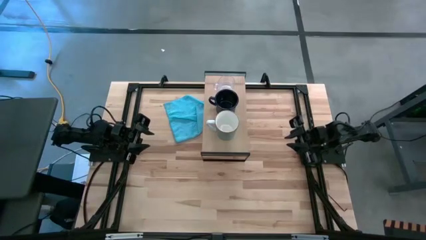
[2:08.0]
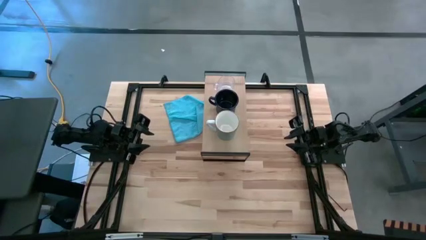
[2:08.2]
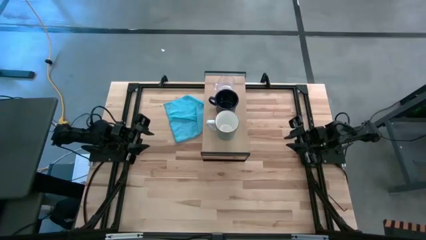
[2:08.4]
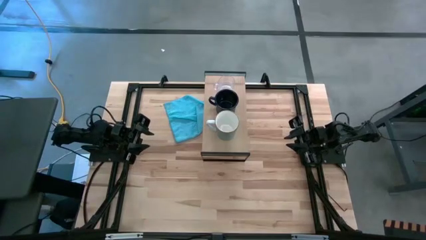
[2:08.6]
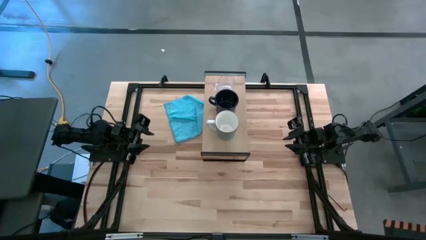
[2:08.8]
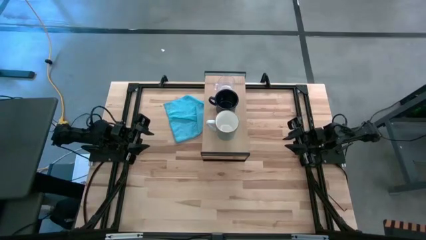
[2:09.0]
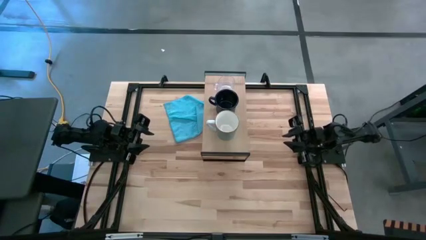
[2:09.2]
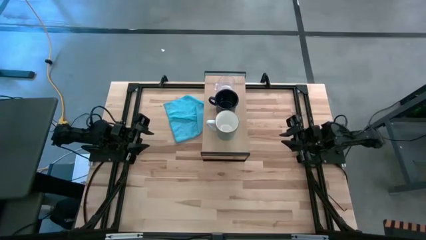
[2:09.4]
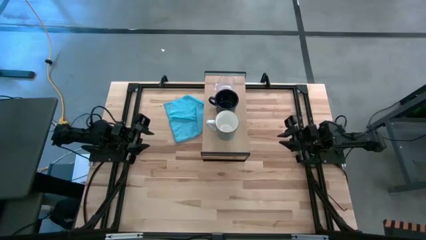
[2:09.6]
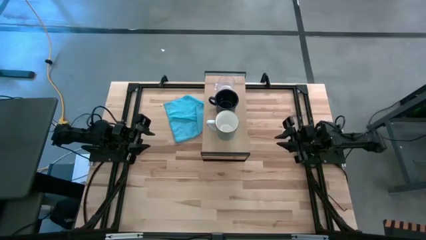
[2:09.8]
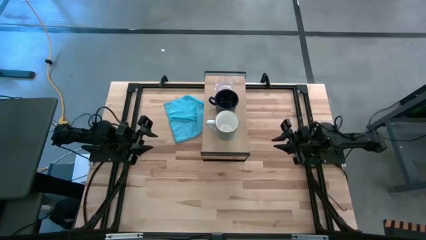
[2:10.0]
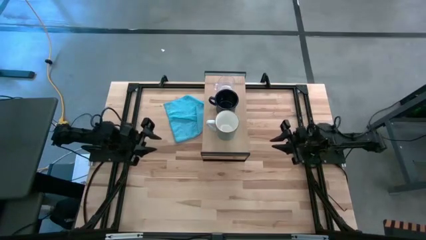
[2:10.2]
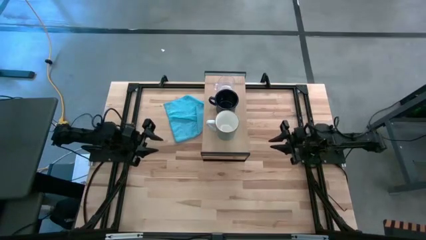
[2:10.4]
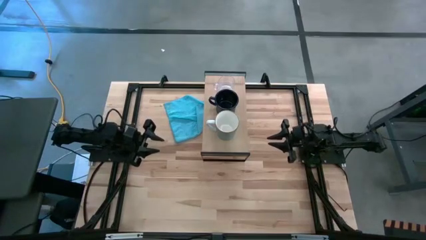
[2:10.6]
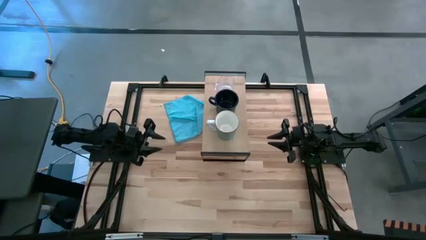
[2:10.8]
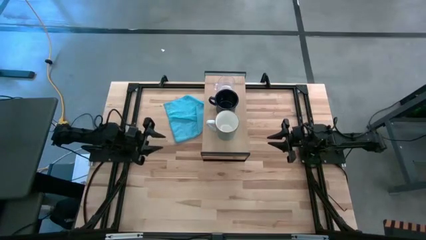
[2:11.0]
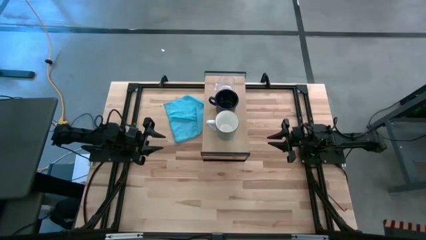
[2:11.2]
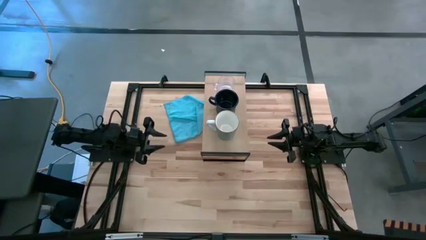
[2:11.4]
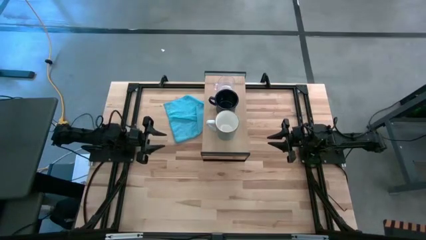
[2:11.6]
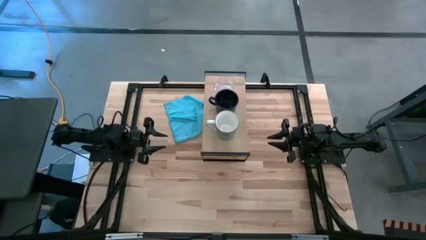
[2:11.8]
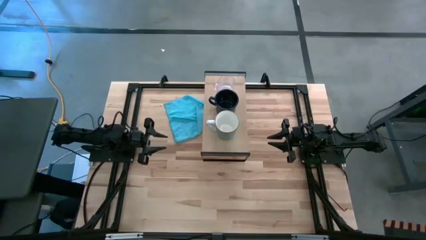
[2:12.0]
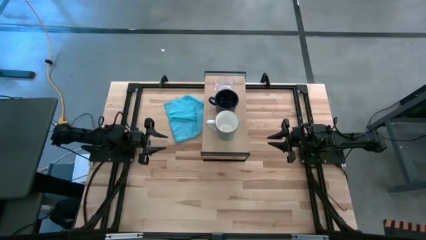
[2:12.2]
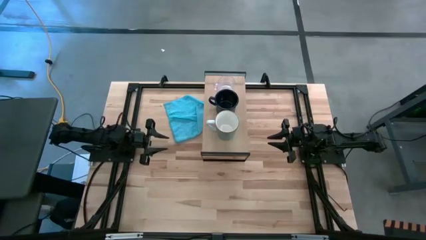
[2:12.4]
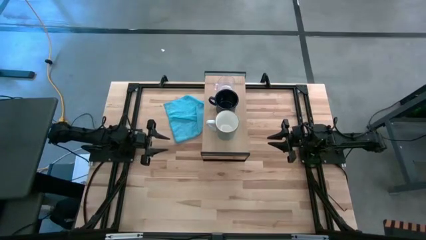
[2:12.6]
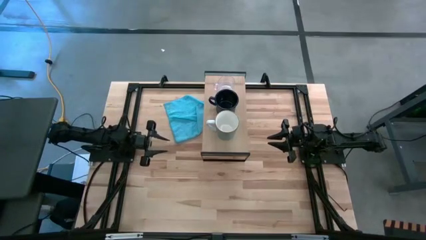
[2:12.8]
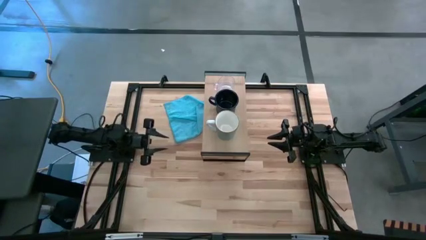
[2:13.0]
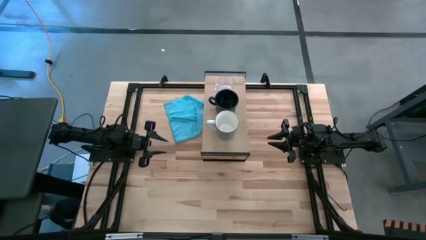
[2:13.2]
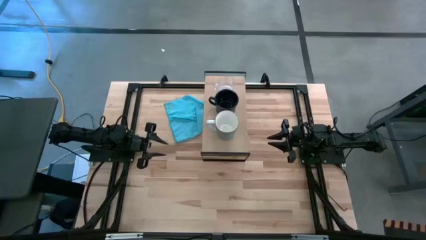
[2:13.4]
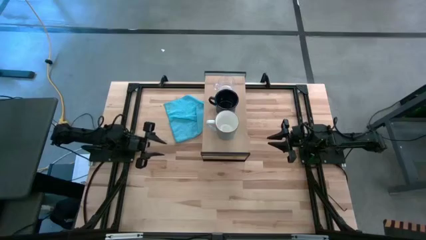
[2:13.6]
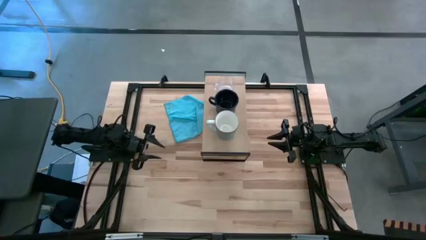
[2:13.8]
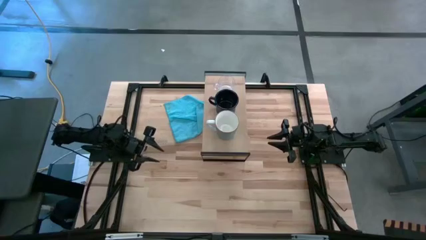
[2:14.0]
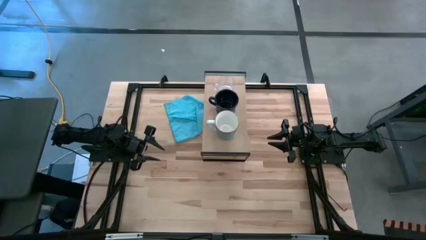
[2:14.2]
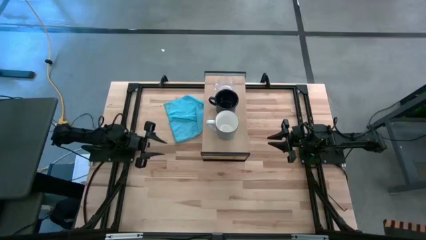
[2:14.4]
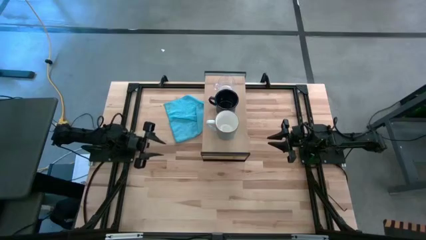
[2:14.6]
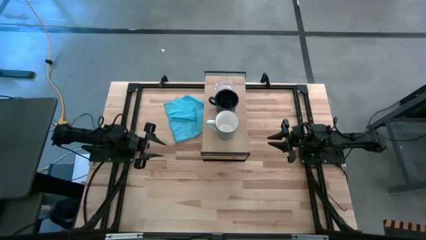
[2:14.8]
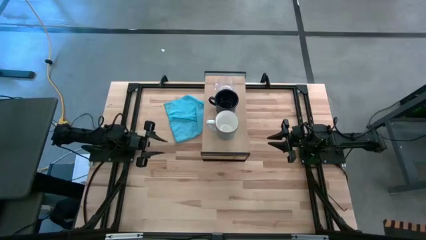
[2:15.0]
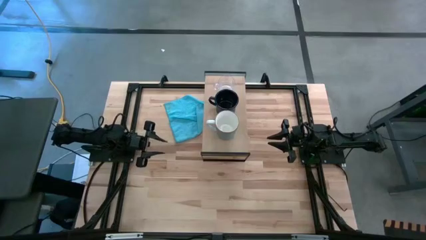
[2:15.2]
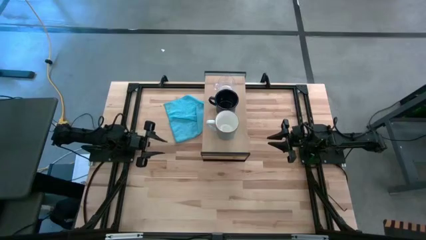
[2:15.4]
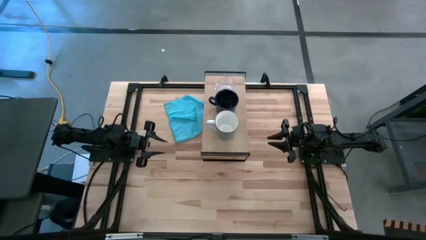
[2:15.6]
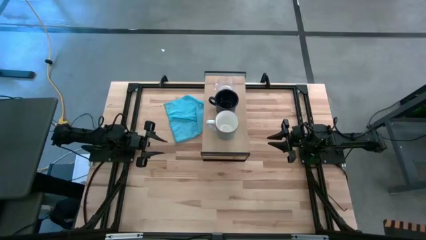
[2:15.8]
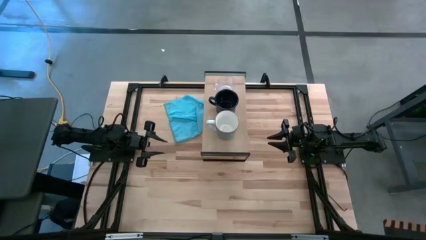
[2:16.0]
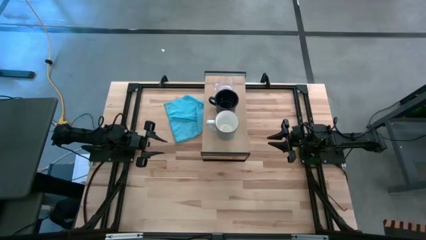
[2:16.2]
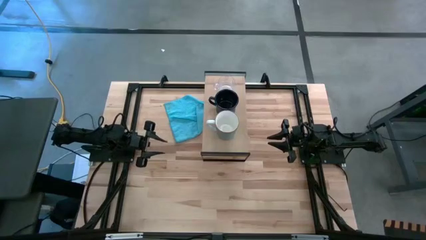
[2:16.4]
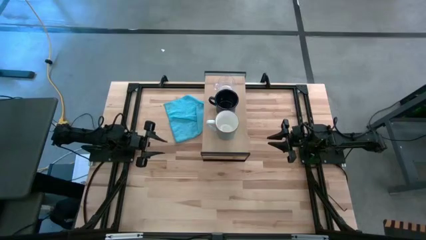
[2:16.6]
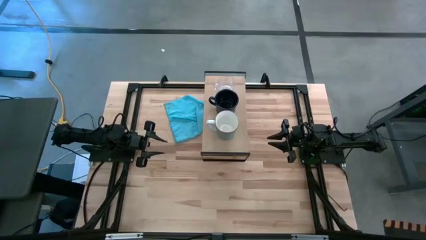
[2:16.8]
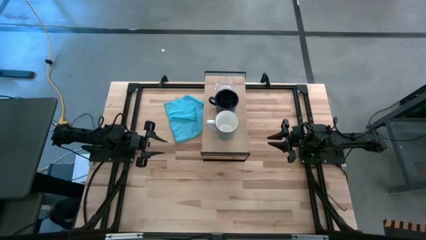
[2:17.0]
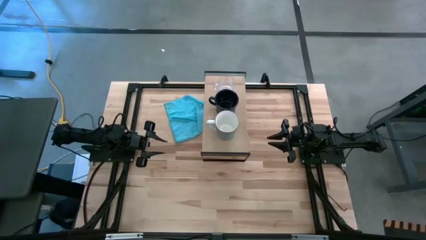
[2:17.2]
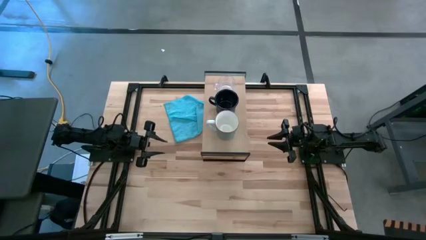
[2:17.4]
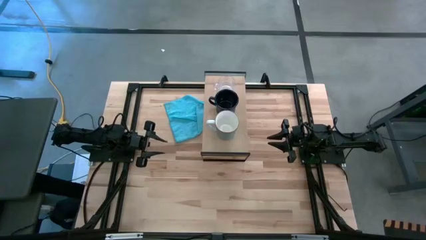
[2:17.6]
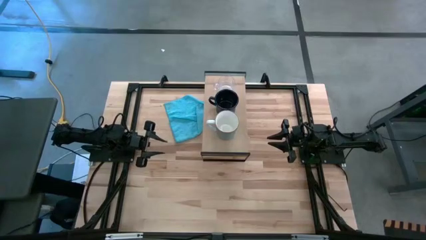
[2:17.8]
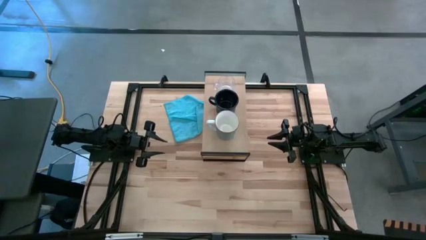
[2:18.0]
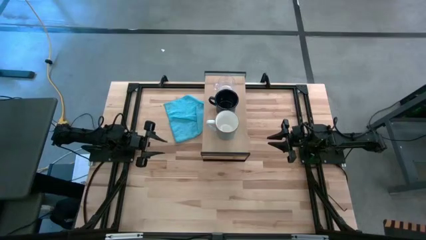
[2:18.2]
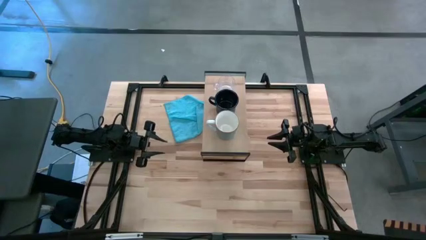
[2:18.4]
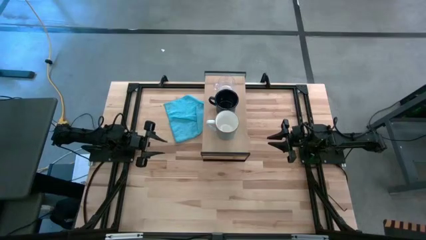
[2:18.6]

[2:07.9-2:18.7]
Task: Stack small to large cups/mugs on shelf
Return to Home Position
